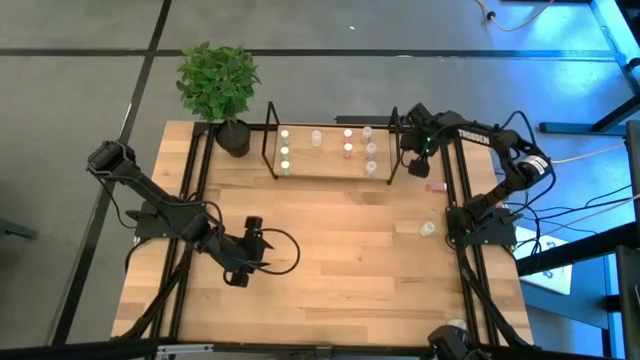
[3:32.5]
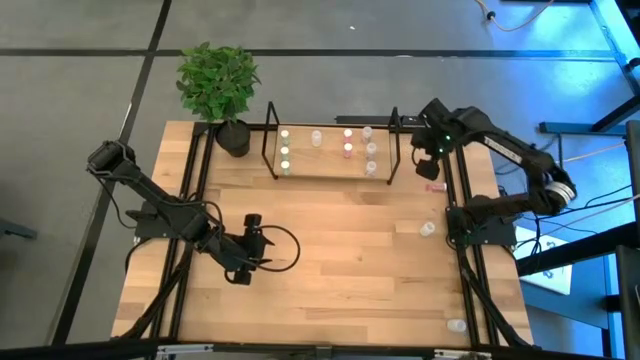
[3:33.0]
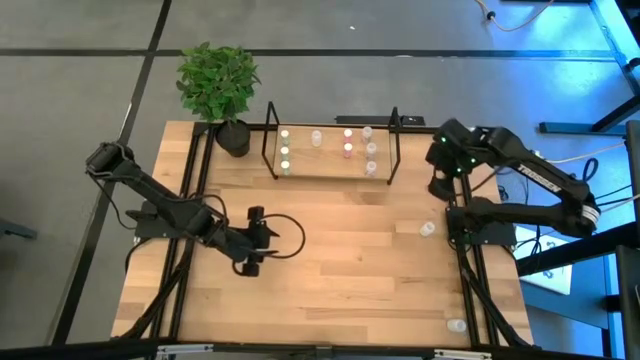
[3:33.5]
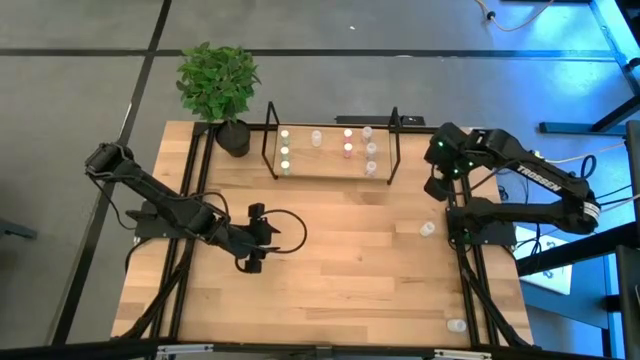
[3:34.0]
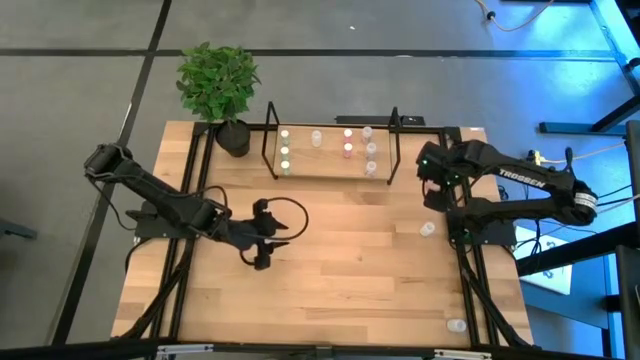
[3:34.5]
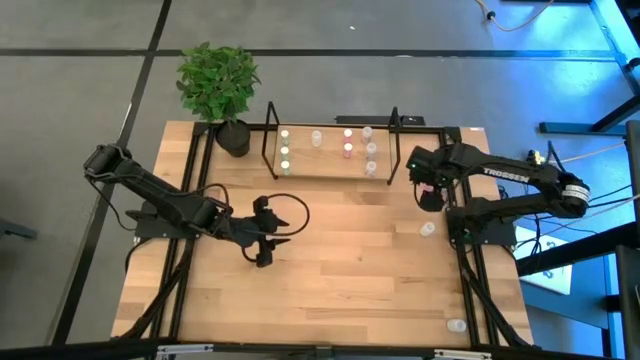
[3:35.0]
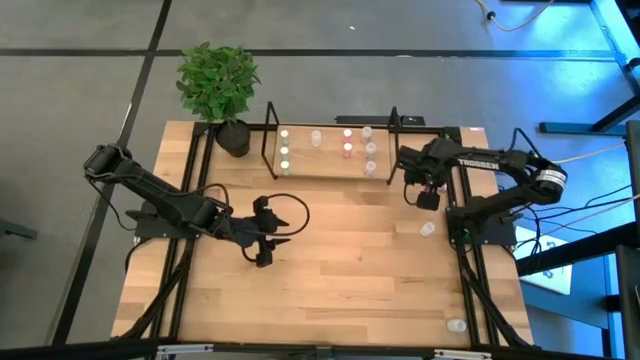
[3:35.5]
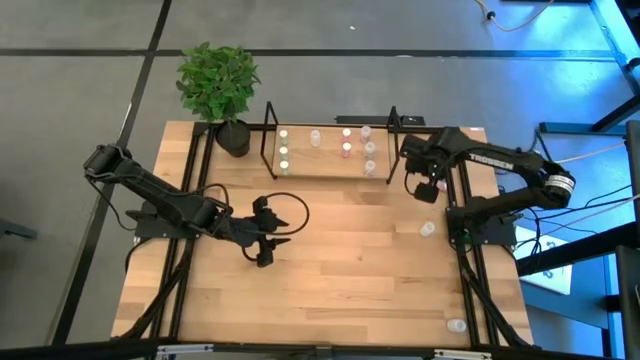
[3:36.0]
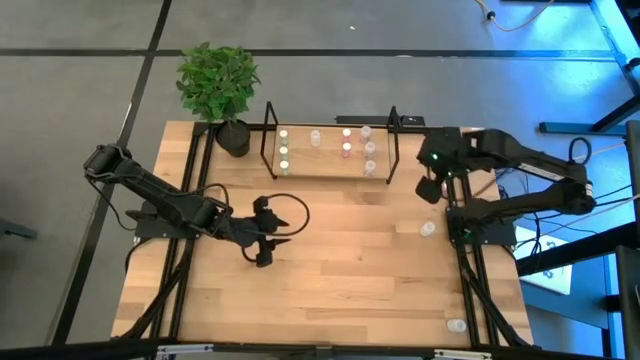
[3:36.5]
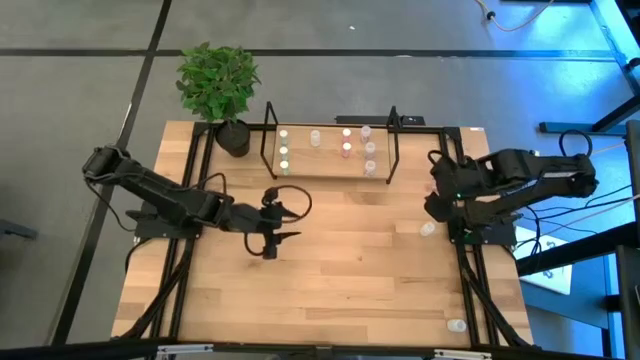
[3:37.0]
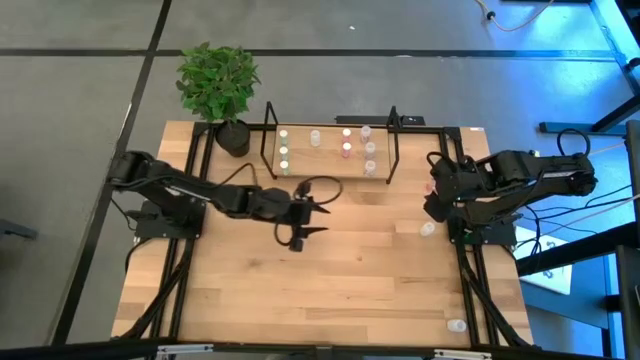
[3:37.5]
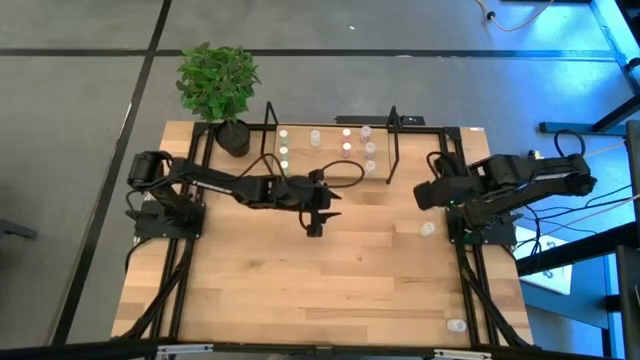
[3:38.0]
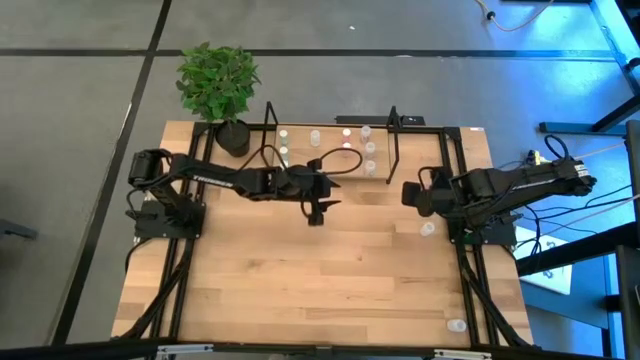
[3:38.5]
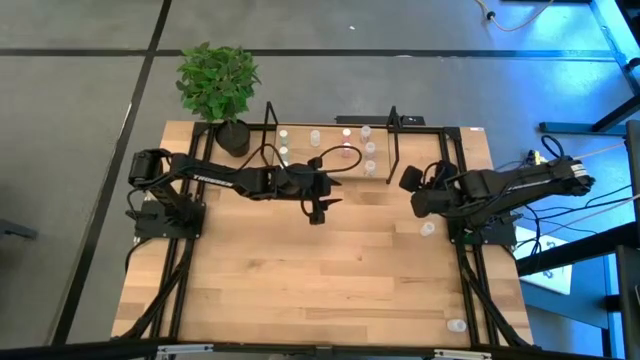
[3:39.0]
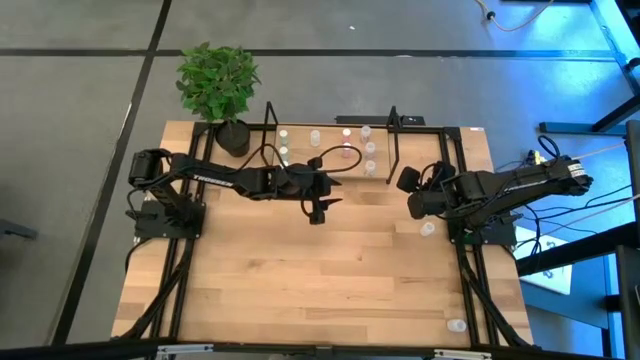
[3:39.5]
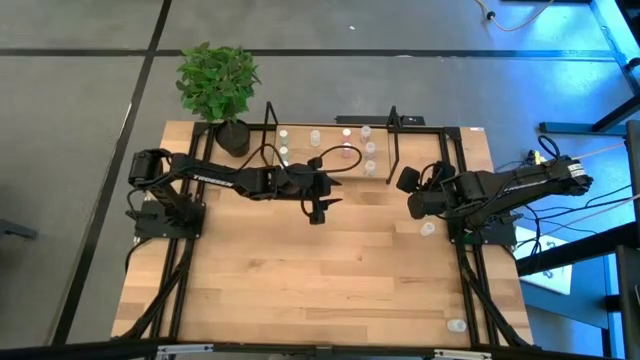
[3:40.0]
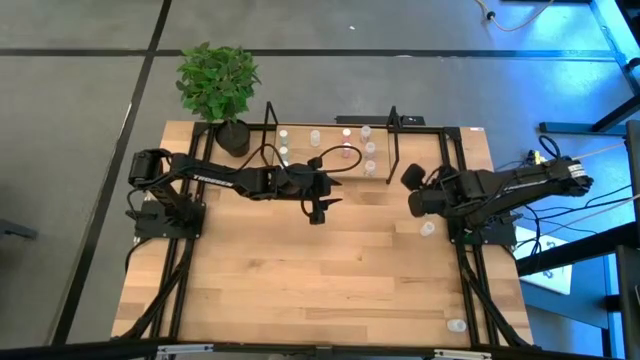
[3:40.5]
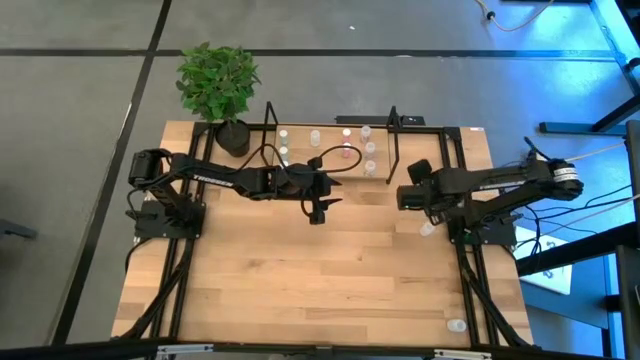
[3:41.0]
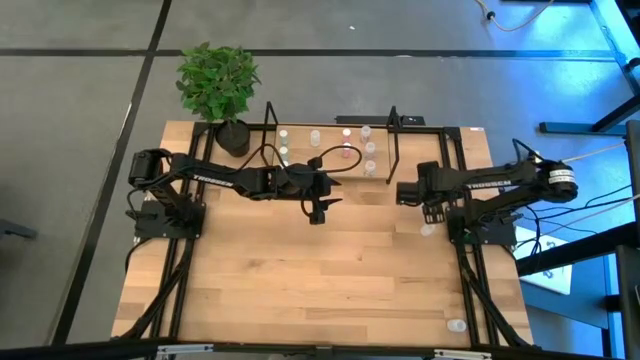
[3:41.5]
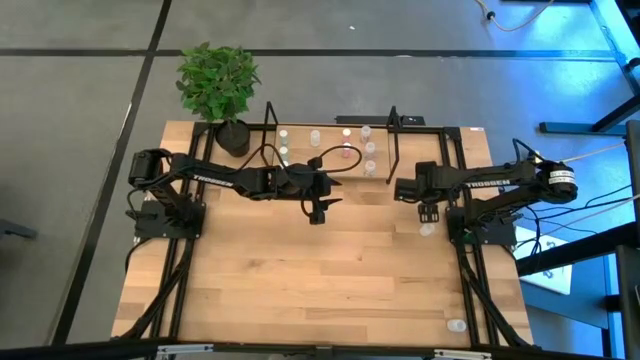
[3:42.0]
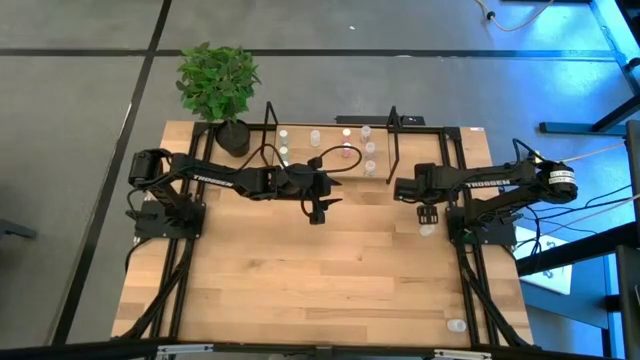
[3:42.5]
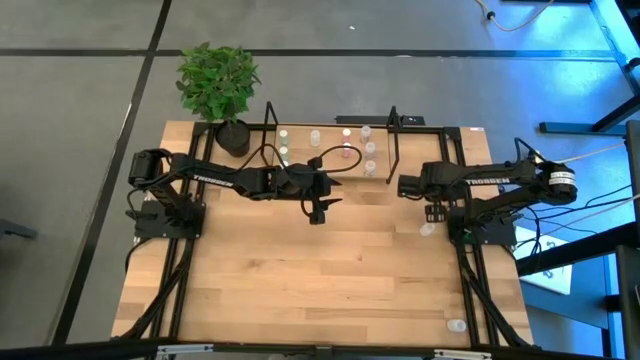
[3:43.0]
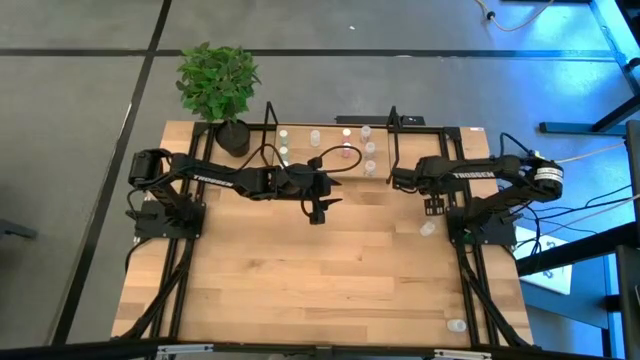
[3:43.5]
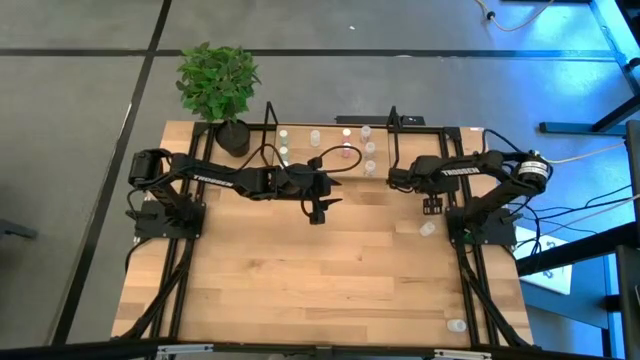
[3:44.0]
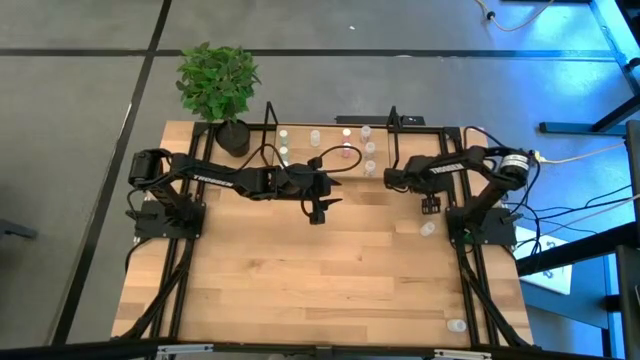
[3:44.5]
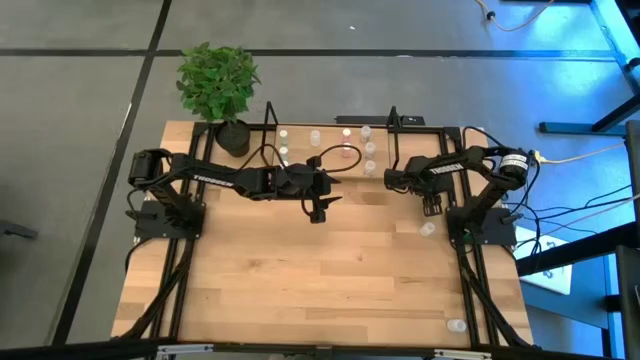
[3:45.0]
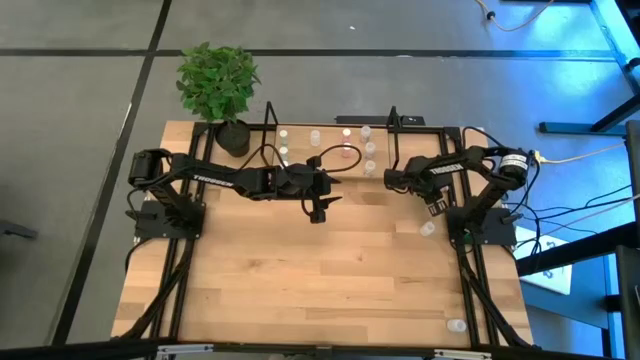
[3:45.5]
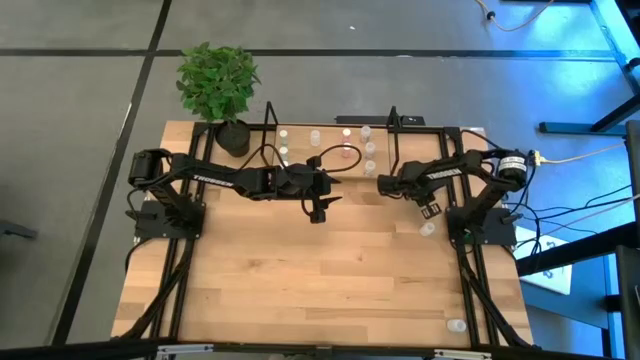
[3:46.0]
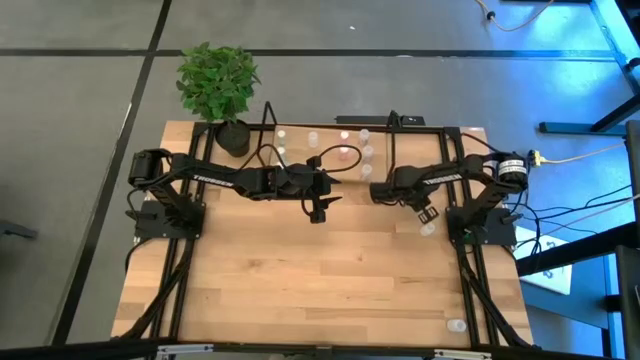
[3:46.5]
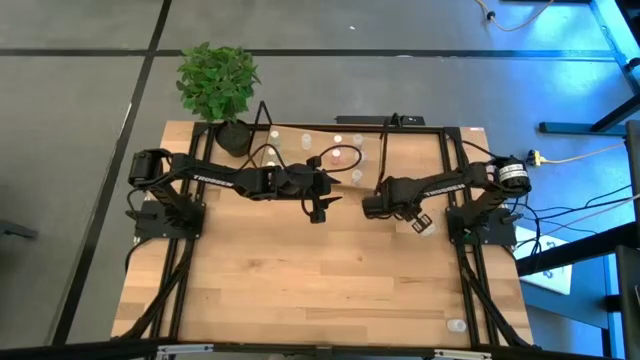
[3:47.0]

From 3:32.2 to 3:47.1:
Task: Pick and place medicine bottles onto shelf by color
Put the pink medicine bottle on the shelf aligned with the other pink medicine bottle

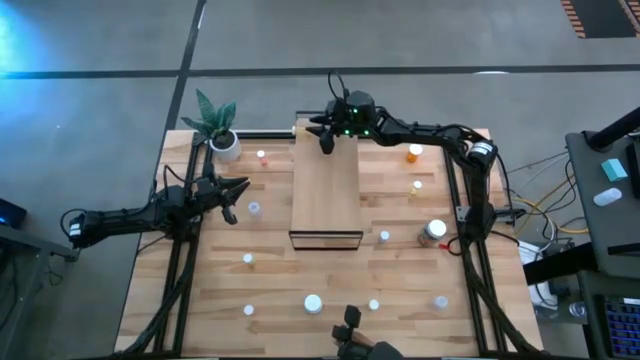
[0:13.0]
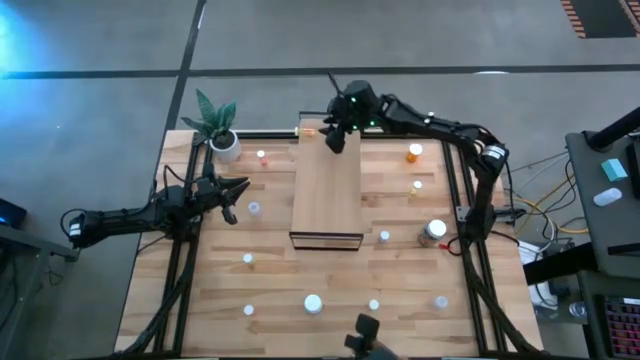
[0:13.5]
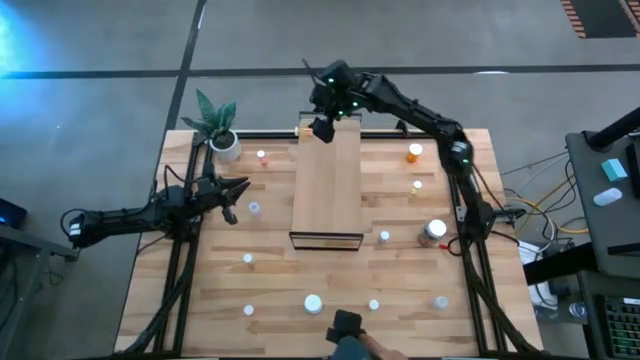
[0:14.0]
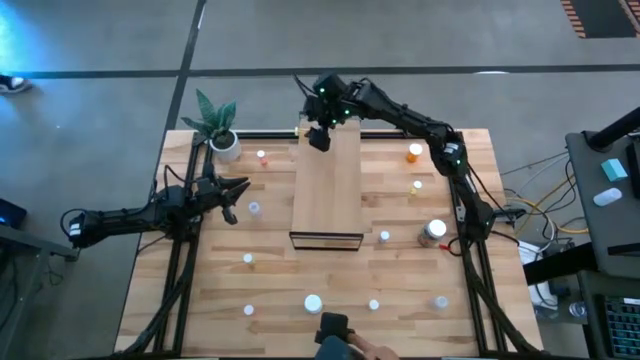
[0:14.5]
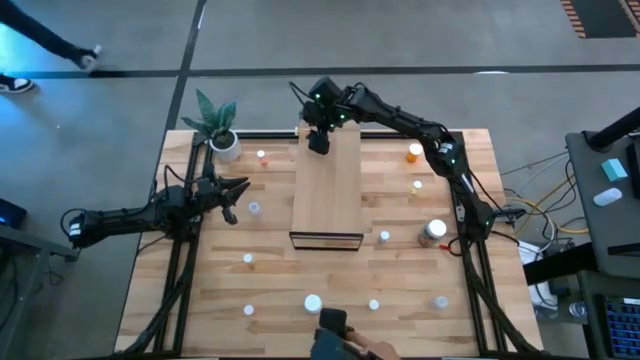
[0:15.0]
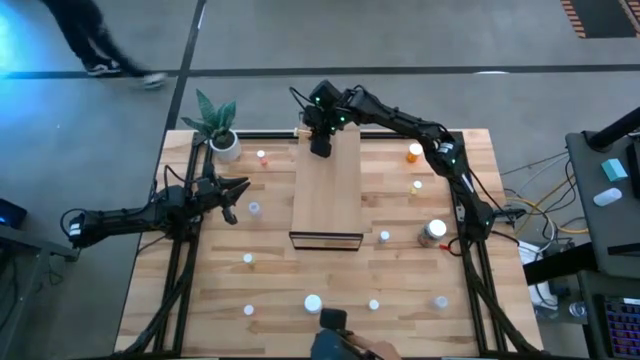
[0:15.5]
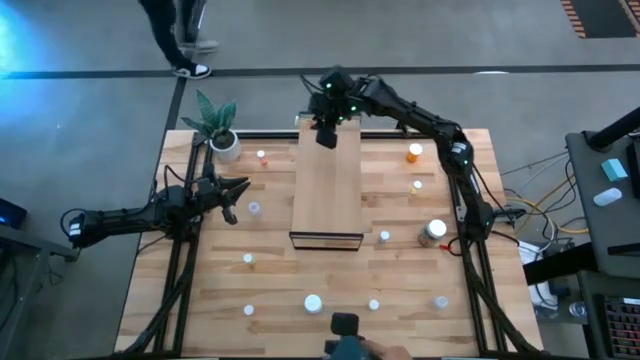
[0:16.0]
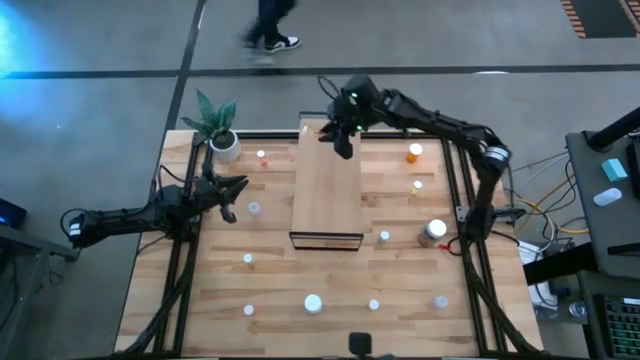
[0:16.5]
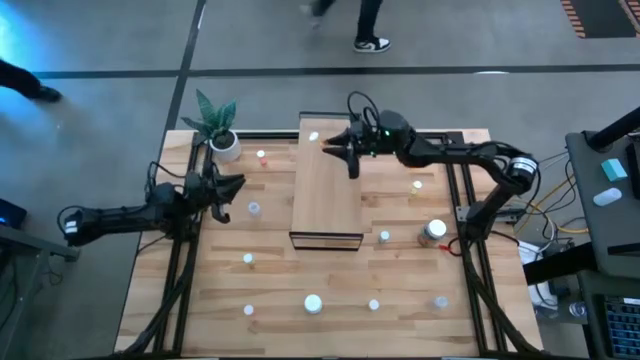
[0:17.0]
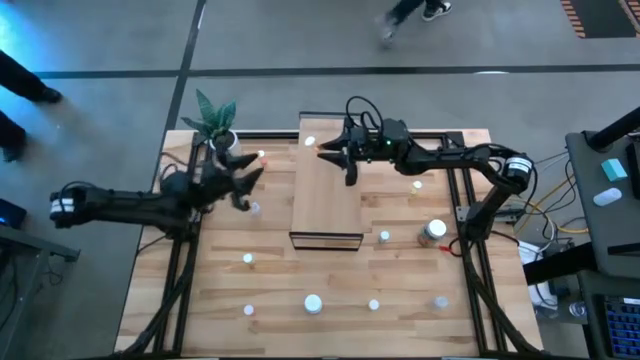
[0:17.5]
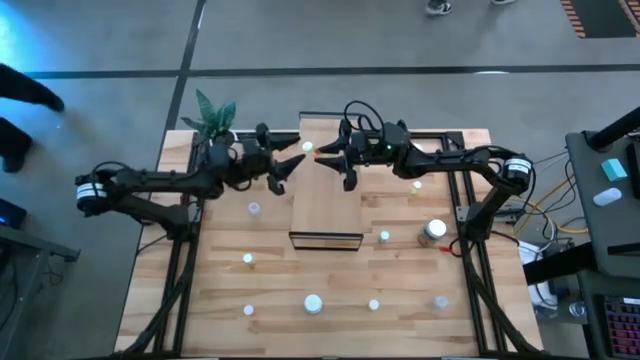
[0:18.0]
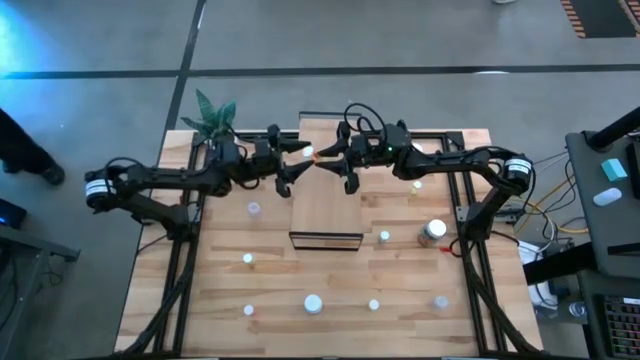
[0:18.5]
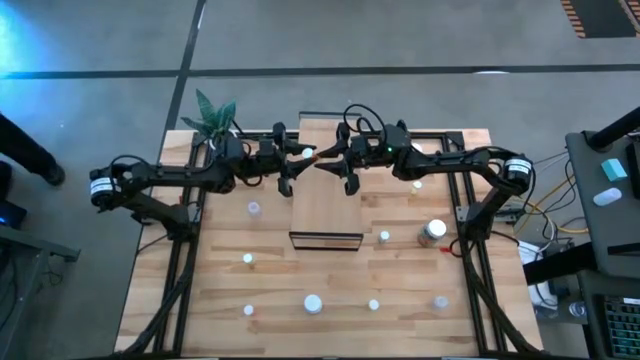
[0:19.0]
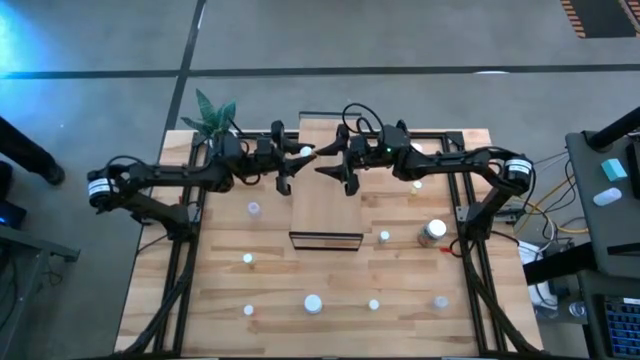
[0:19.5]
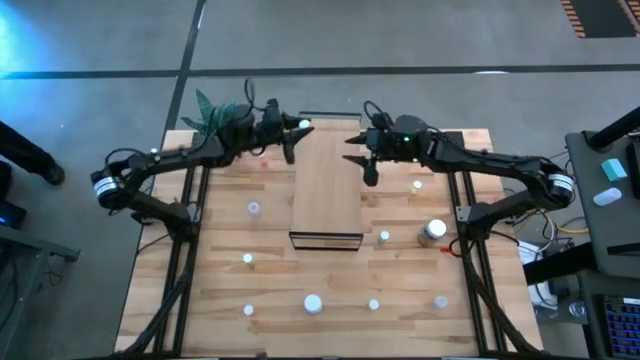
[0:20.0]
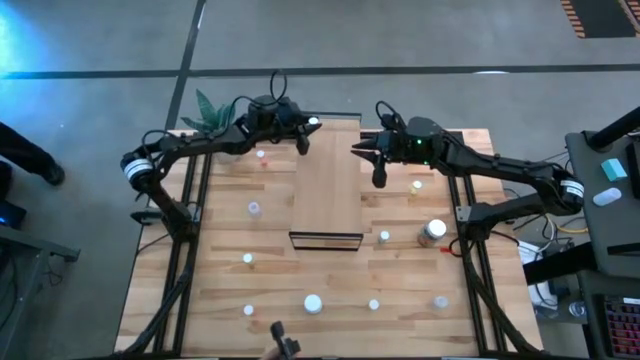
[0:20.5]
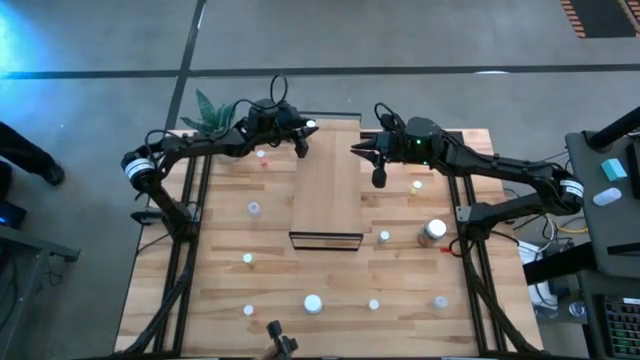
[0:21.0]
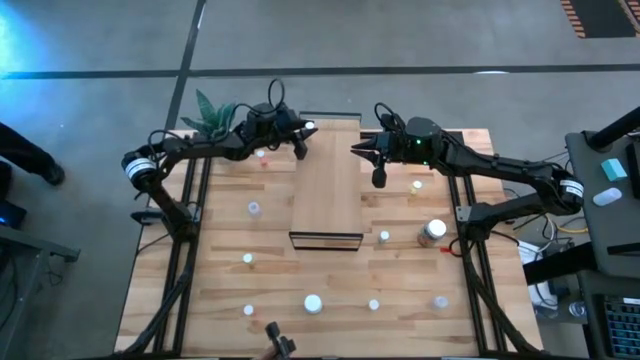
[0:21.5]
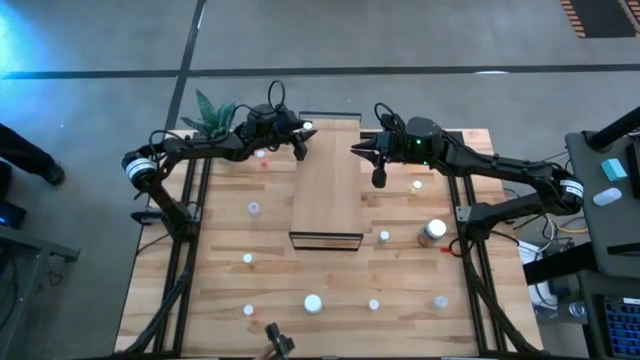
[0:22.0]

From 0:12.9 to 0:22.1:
Task: Pick and place medicine bottles onto shelf by color
Put the top yellow pill bottle on the shelf
